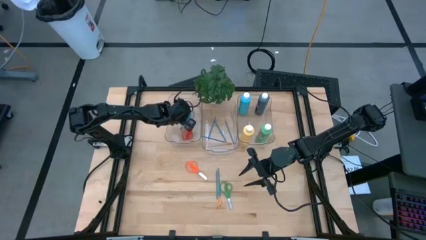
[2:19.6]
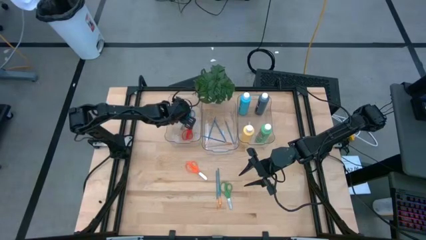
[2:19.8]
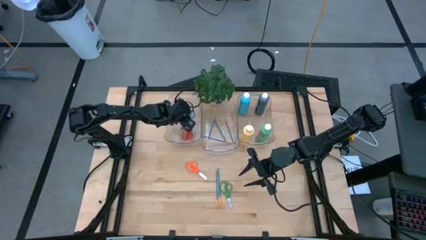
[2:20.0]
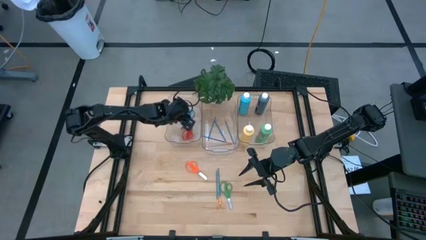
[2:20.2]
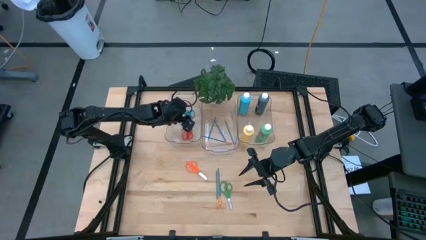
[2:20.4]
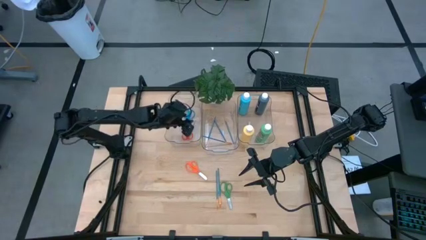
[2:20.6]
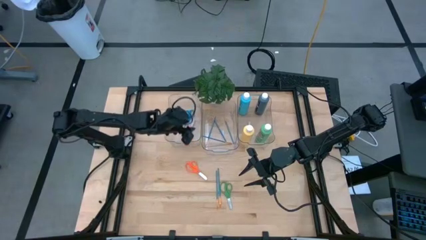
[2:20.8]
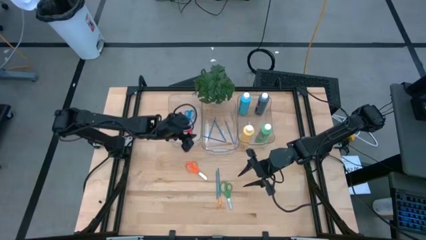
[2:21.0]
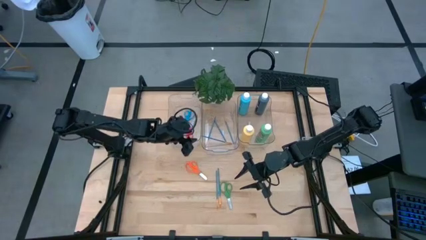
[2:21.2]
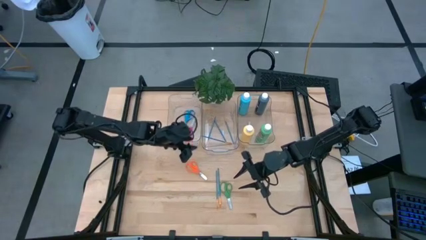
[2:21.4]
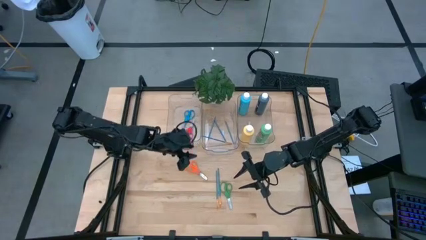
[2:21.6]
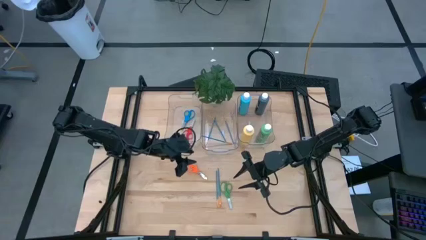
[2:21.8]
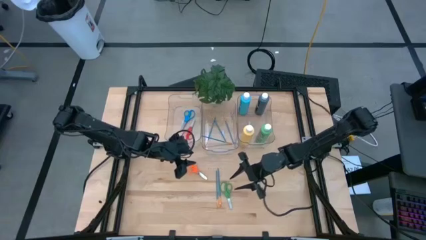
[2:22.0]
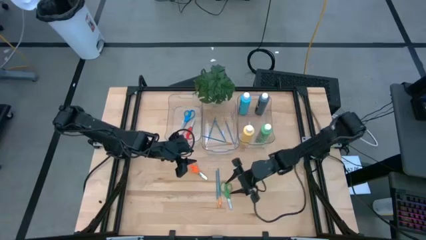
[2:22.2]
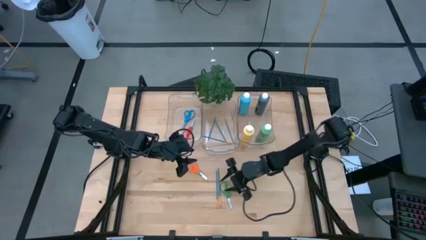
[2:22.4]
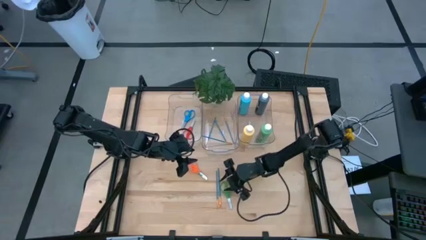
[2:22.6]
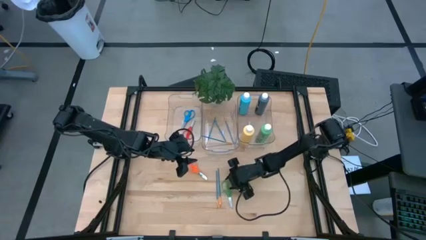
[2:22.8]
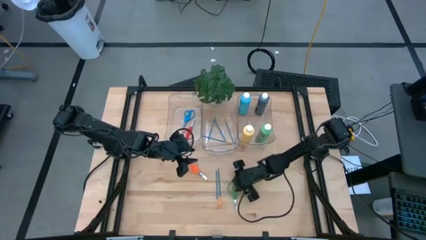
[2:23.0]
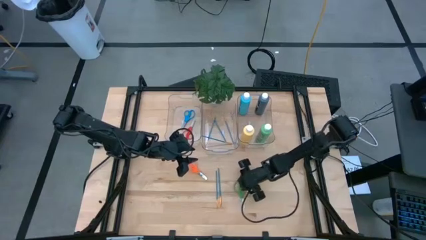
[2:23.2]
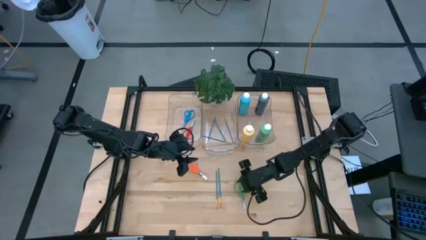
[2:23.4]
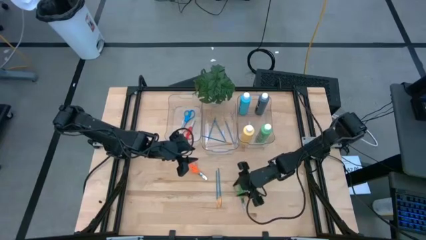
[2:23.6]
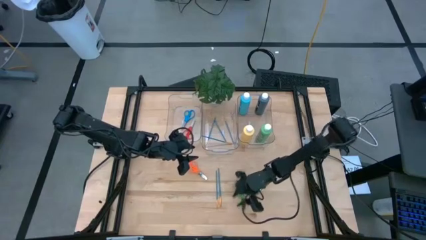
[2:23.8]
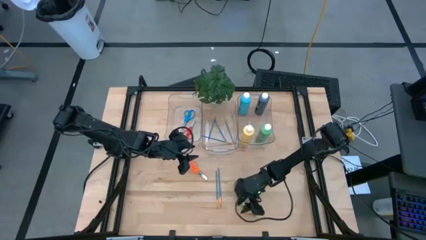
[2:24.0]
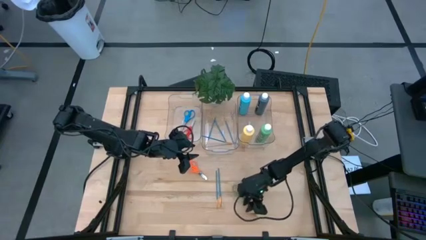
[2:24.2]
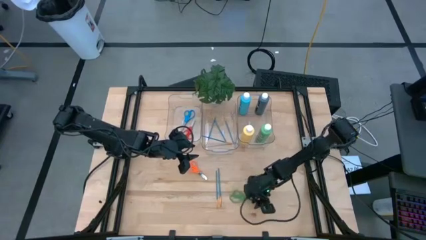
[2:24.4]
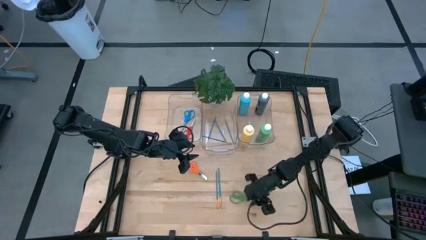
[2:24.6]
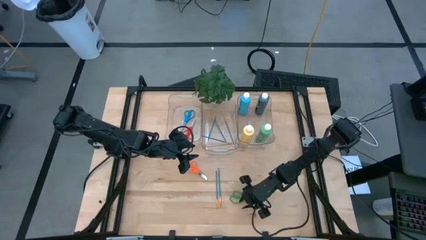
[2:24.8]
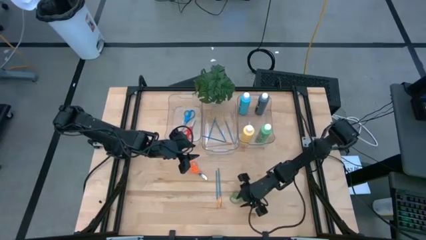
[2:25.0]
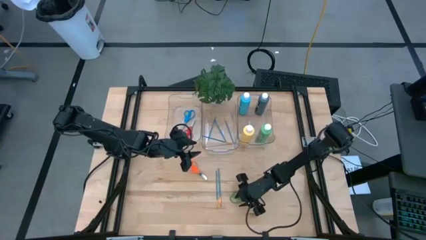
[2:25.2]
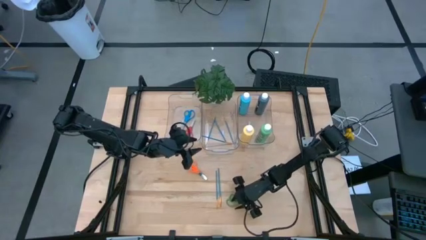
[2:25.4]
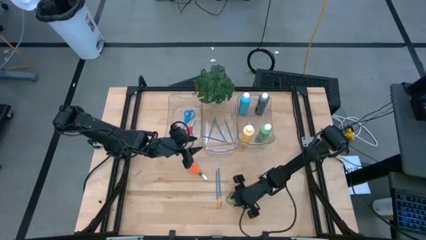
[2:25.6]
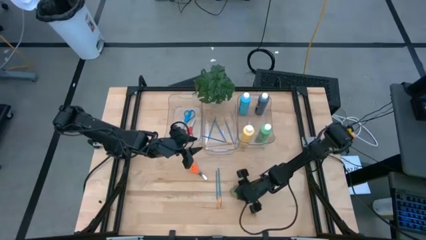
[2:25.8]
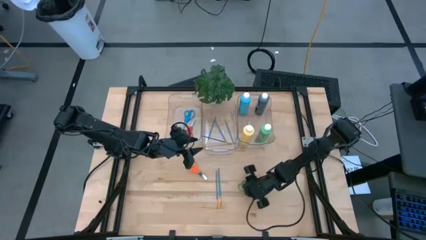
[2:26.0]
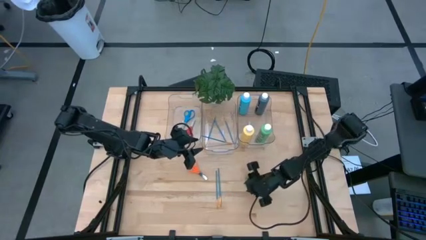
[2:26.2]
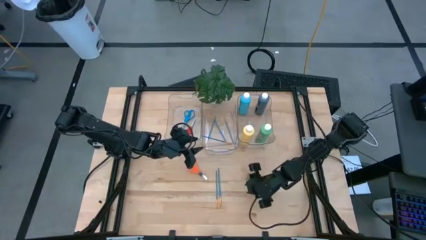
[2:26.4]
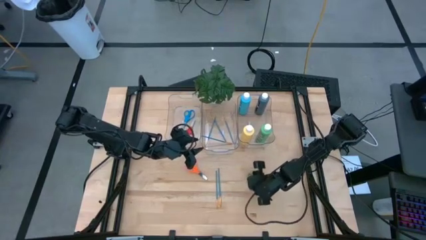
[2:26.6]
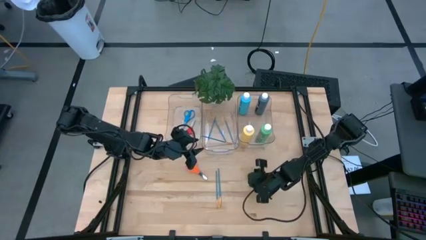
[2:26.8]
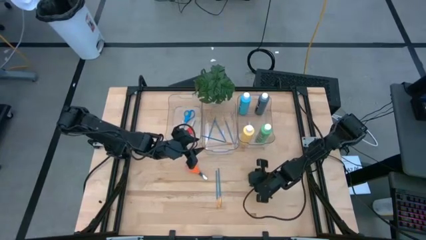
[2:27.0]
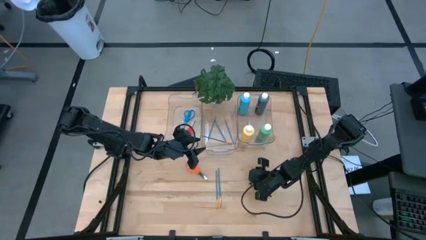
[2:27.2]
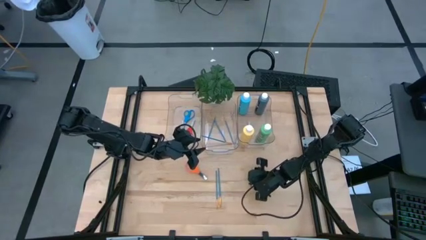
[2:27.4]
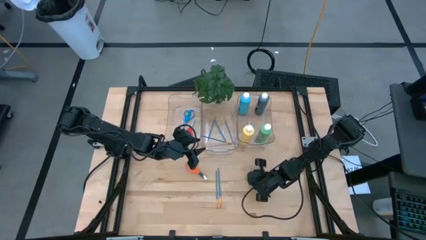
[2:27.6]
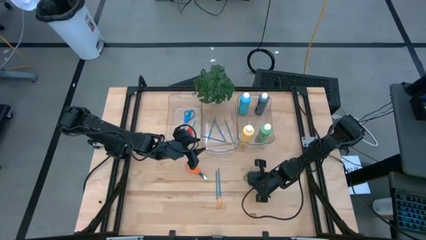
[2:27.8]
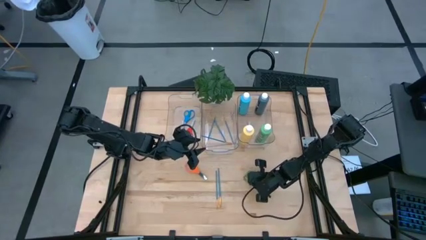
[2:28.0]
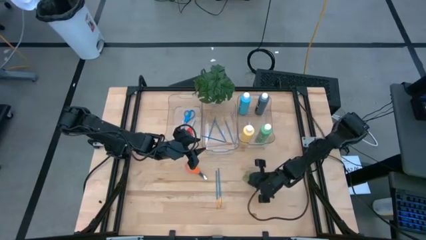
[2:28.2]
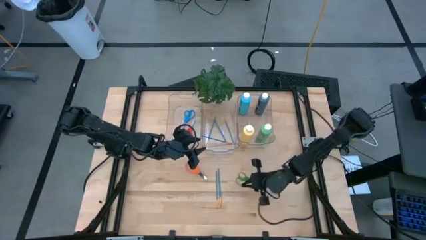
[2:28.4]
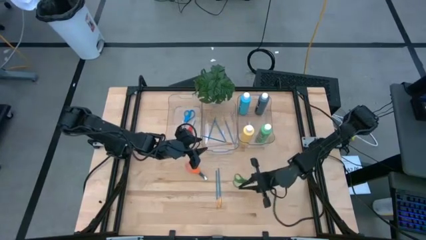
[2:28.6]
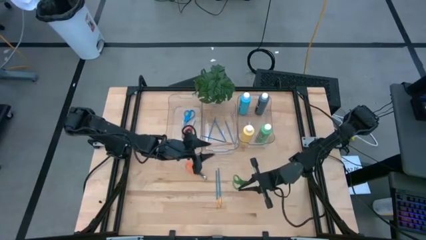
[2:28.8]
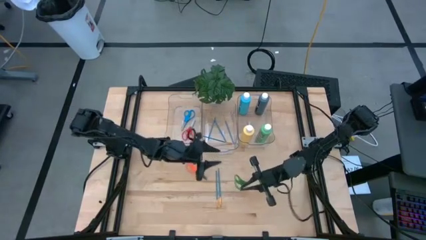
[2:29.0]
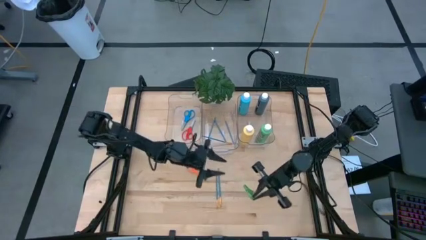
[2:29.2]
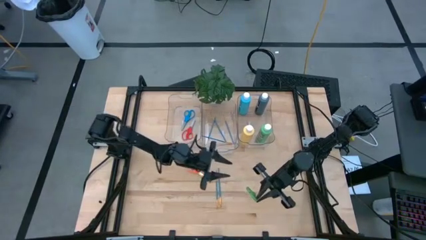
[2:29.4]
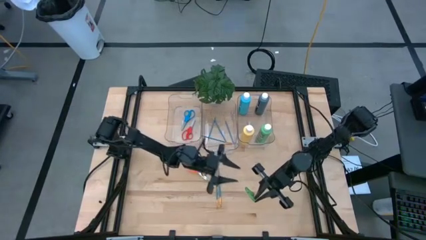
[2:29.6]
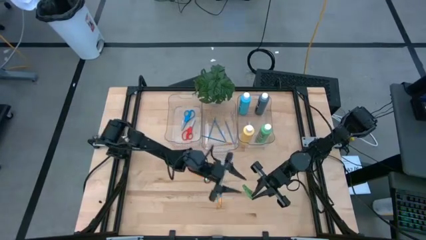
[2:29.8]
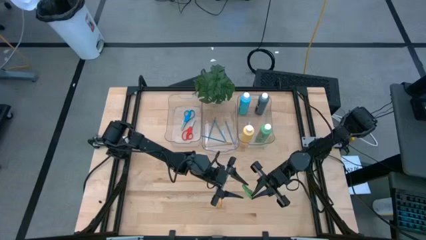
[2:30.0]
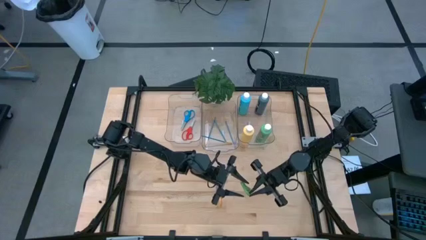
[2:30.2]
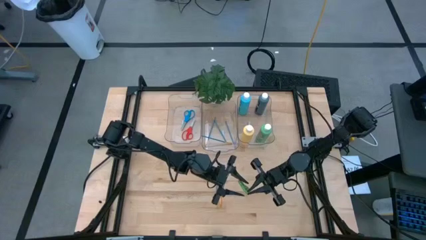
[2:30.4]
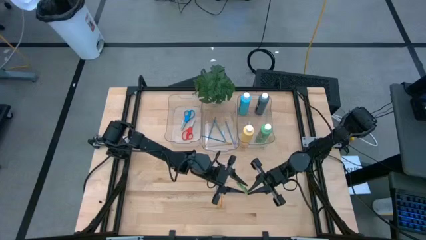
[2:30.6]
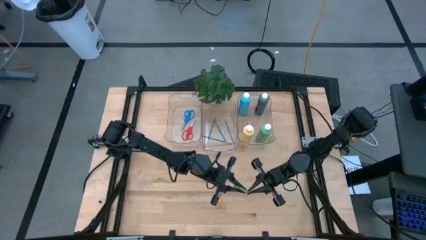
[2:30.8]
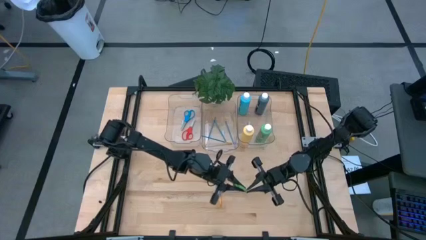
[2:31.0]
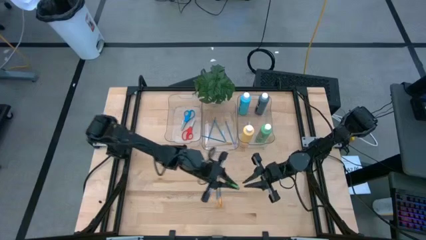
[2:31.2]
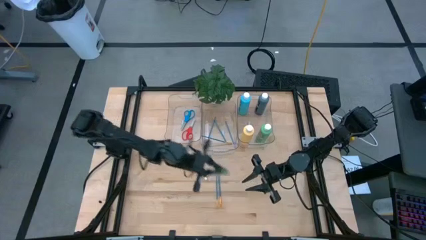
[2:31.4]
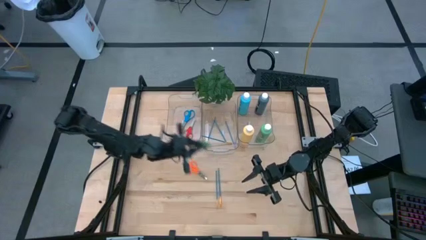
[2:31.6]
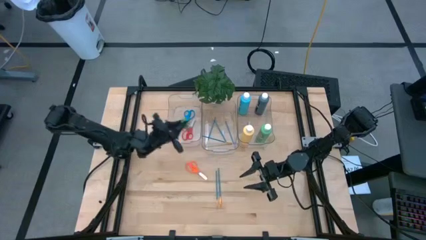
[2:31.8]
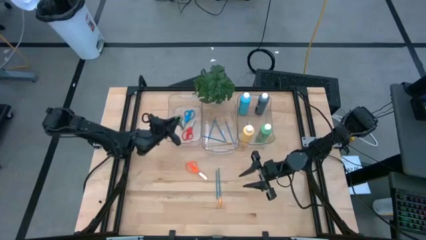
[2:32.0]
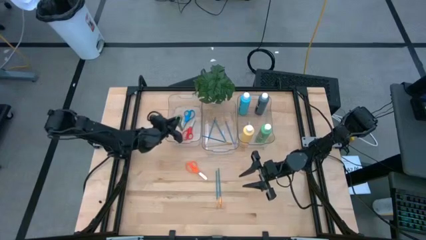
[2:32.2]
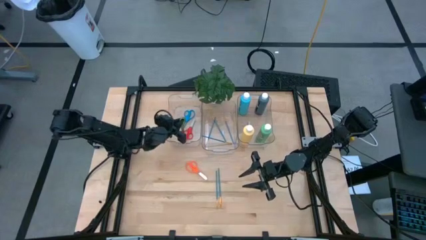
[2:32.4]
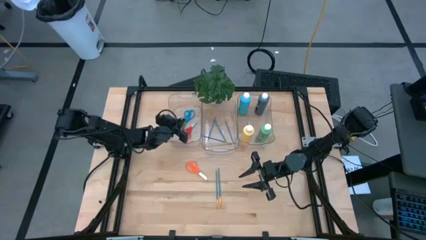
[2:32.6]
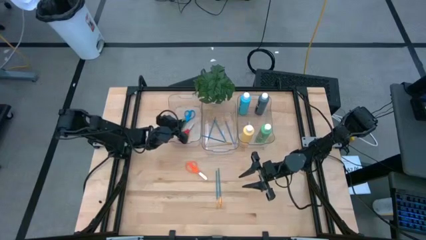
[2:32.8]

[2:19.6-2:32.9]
Task: Pick & Place Paint Supplies
Put the green scissors into the left transparent bin

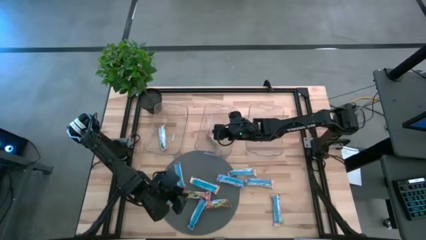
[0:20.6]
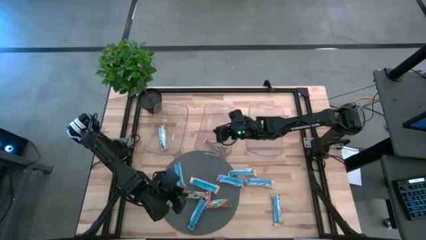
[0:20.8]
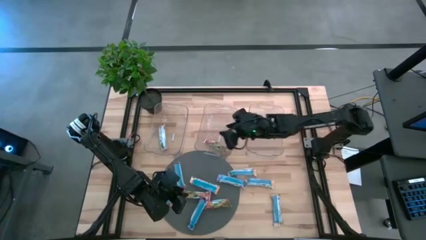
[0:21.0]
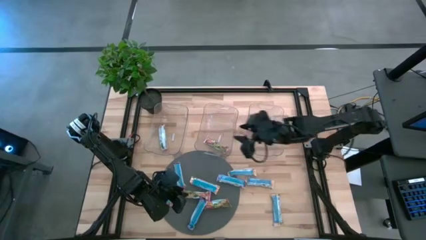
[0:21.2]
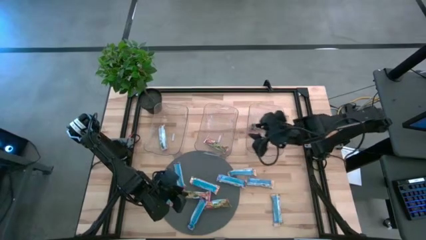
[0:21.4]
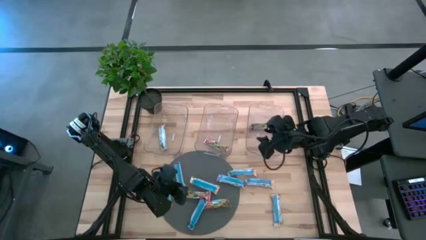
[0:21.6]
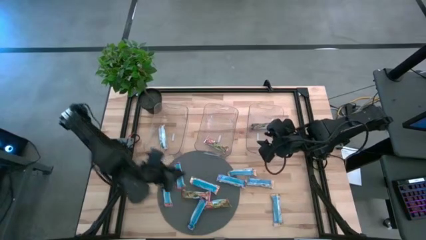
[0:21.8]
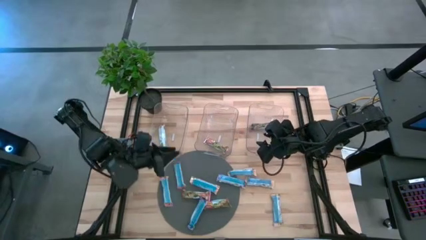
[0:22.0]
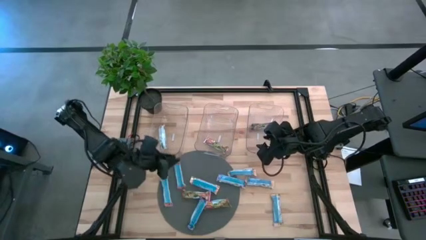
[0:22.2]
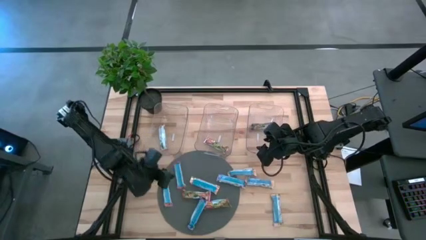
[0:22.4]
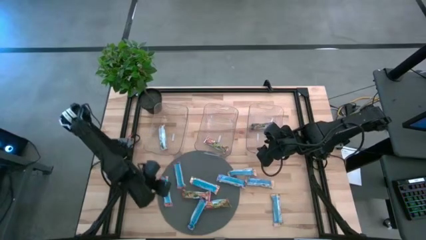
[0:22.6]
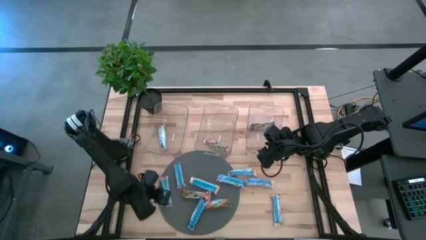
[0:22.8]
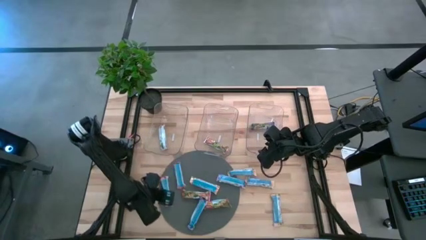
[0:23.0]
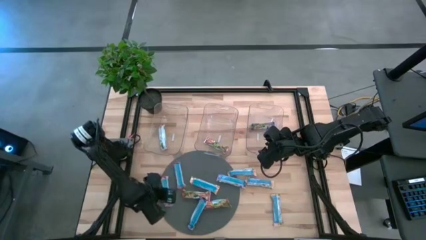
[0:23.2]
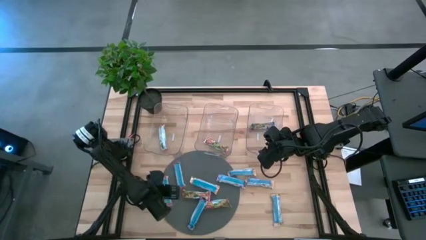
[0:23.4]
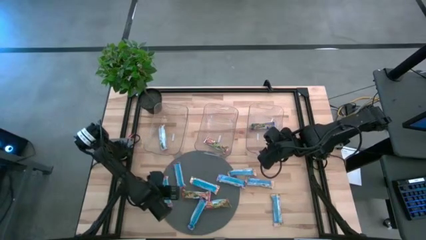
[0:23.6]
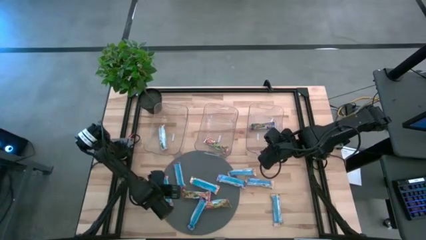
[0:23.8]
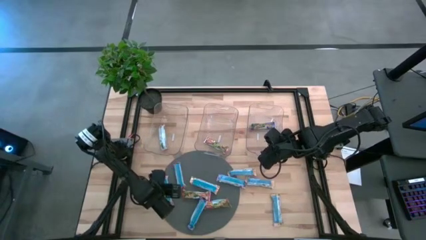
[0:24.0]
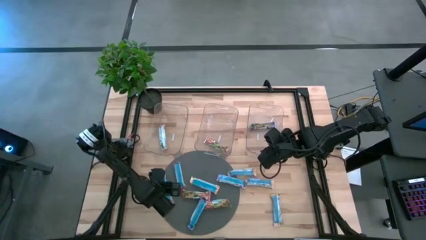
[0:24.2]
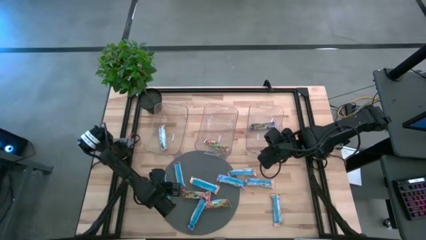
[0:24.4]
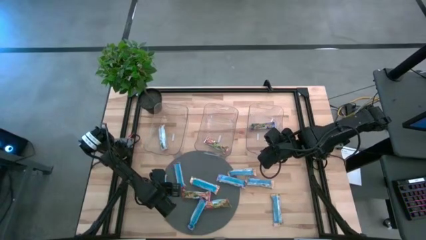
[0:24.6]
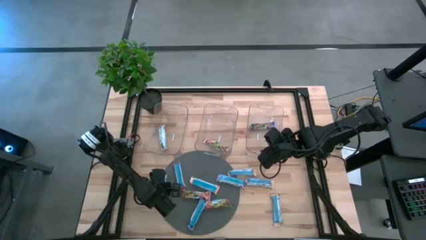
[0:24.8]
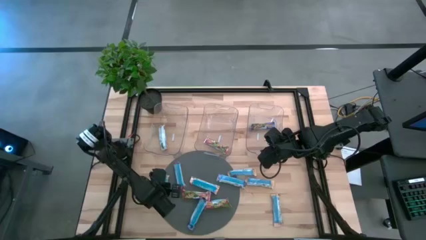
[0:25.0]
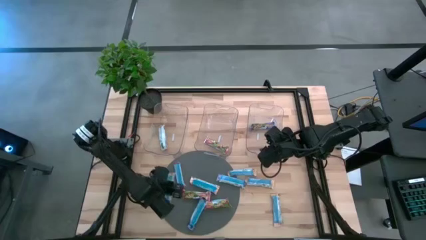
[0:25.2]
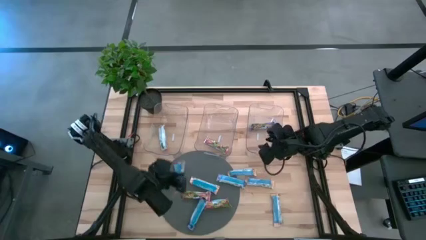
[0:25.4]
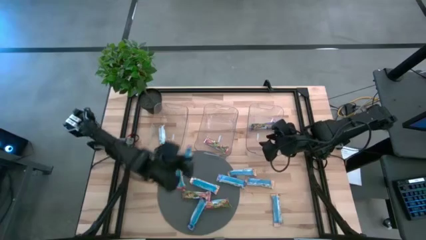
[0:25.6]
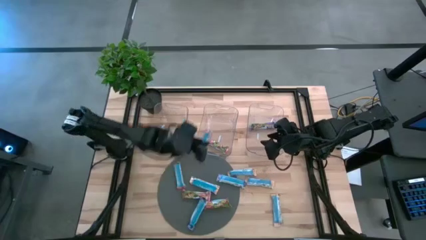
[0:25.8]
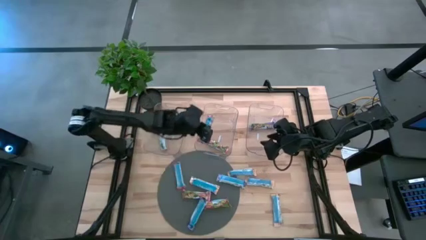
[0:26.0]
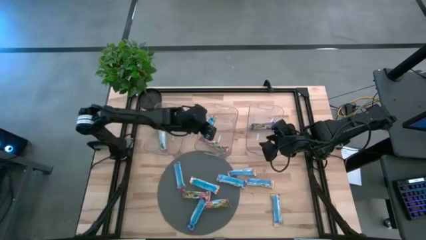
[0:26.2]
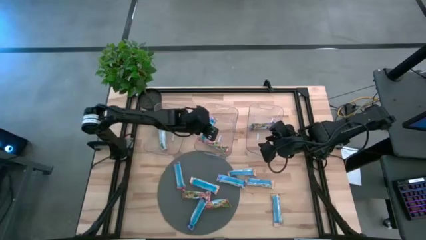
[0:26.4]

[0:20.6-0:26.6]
Task: Pick and place Granola Bars by type
Put the red granola bar into the middle transparent bin
